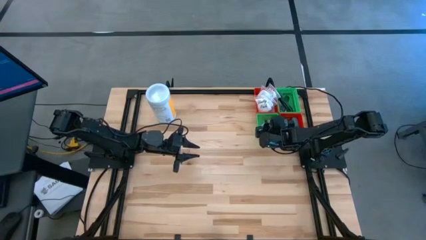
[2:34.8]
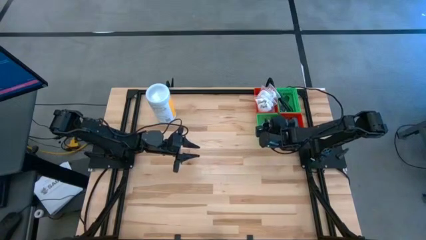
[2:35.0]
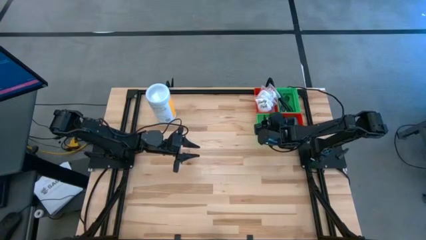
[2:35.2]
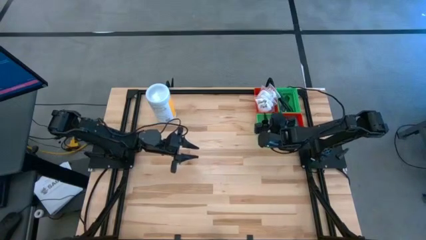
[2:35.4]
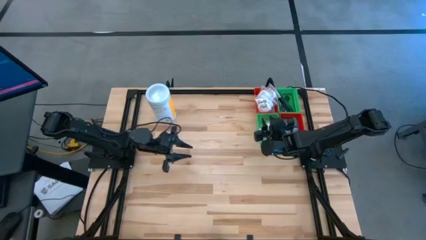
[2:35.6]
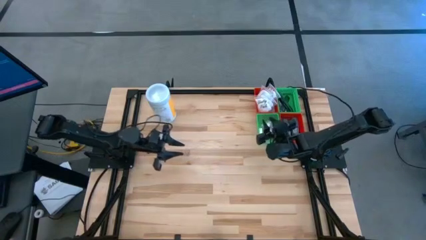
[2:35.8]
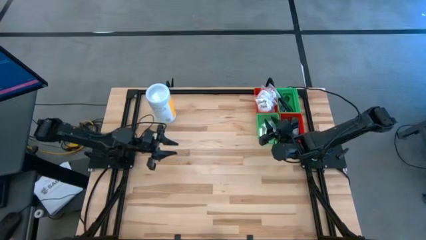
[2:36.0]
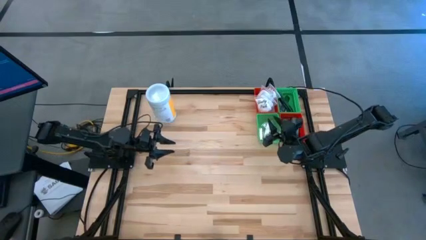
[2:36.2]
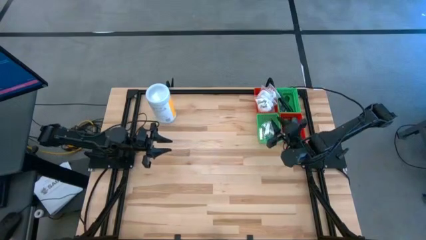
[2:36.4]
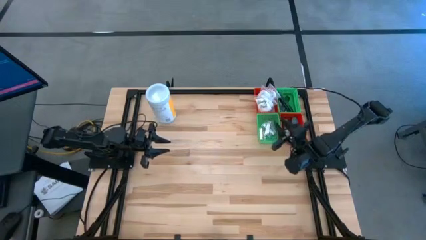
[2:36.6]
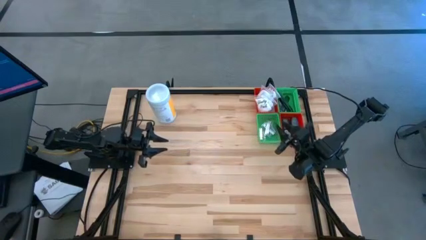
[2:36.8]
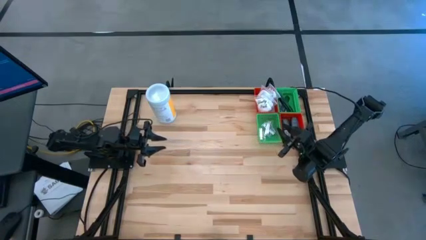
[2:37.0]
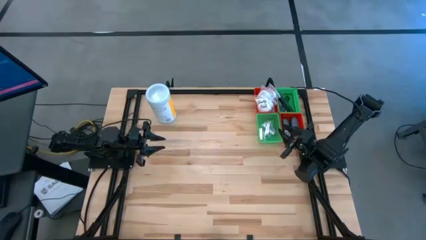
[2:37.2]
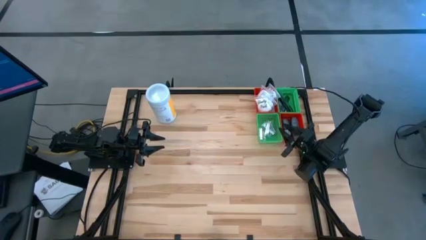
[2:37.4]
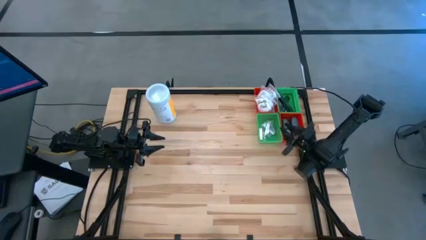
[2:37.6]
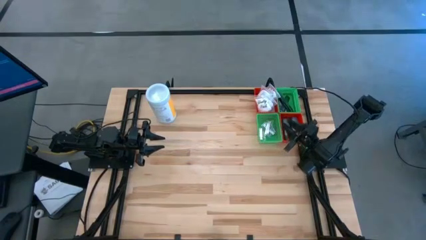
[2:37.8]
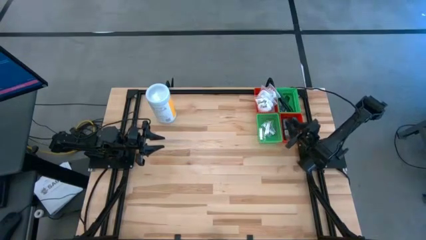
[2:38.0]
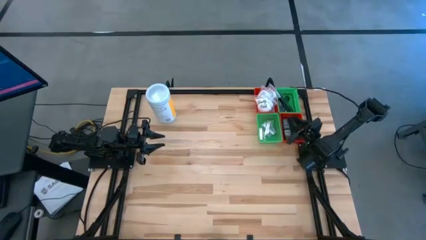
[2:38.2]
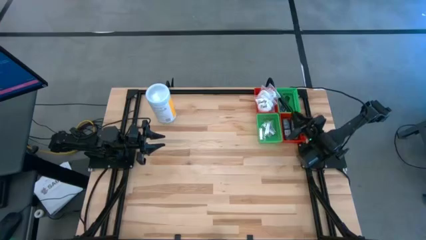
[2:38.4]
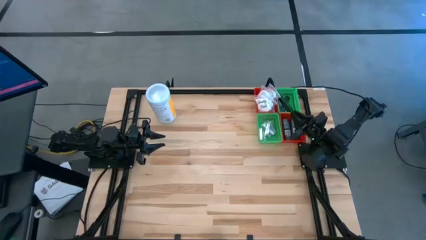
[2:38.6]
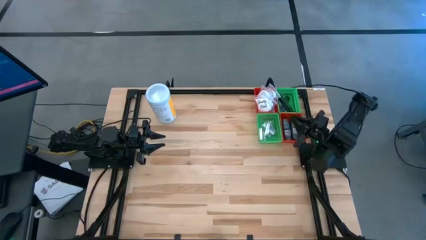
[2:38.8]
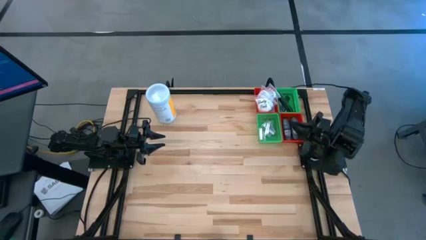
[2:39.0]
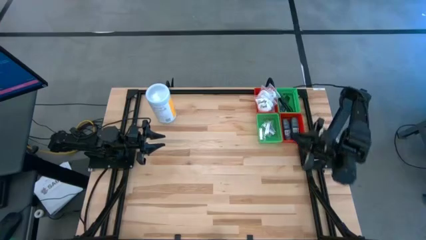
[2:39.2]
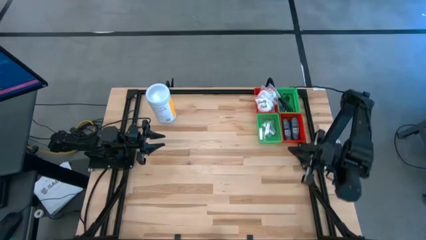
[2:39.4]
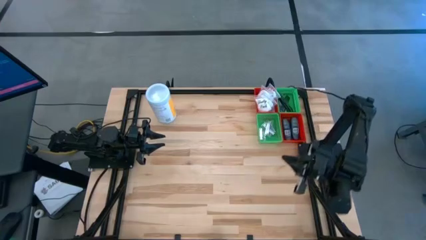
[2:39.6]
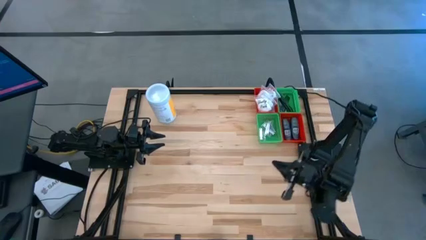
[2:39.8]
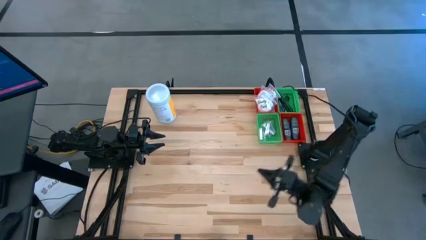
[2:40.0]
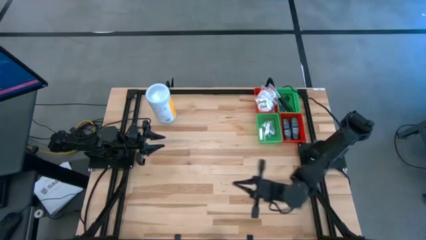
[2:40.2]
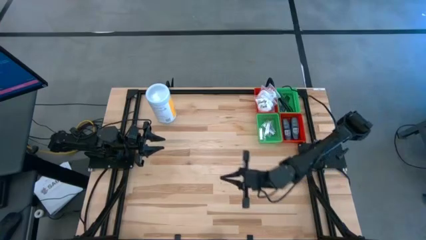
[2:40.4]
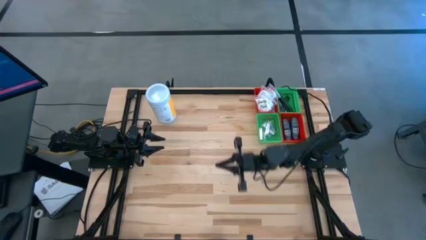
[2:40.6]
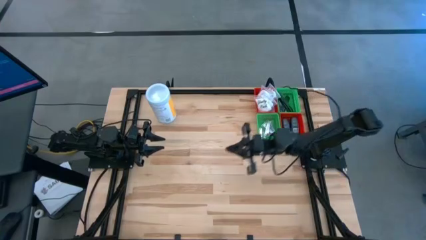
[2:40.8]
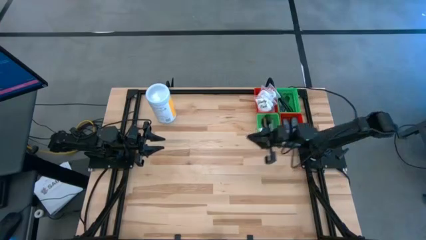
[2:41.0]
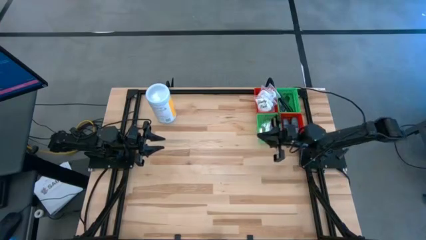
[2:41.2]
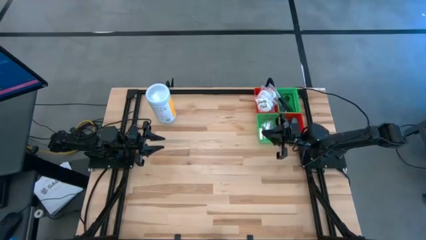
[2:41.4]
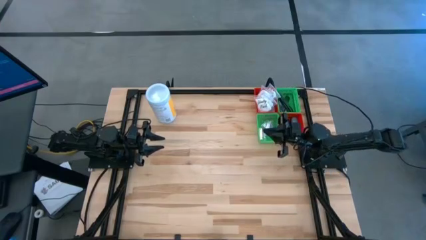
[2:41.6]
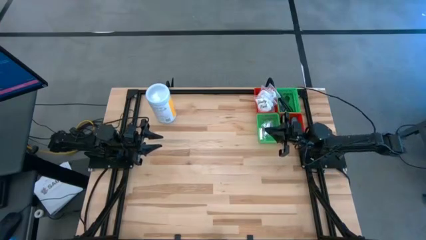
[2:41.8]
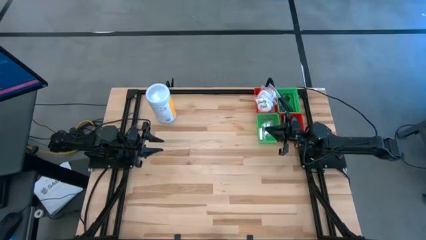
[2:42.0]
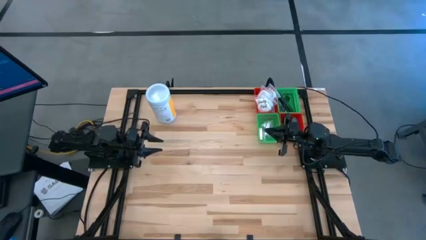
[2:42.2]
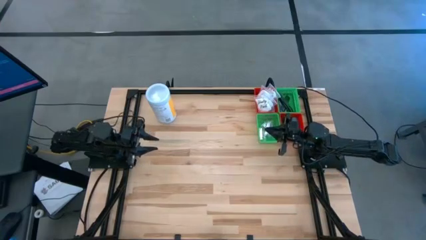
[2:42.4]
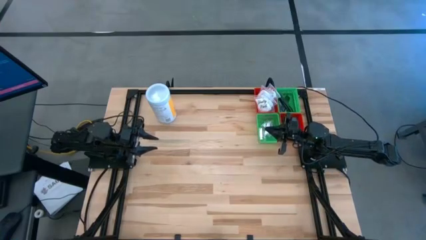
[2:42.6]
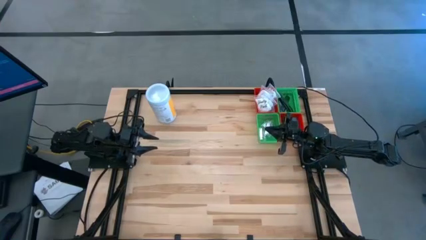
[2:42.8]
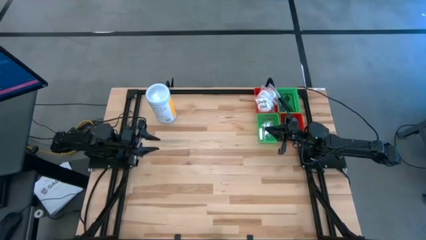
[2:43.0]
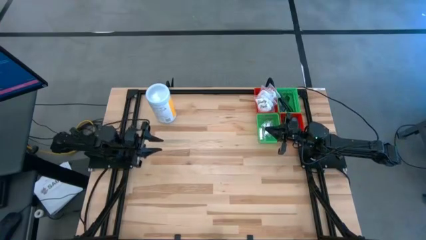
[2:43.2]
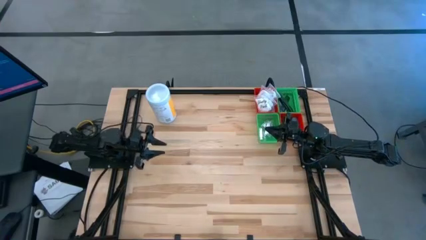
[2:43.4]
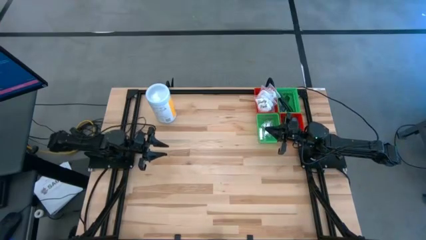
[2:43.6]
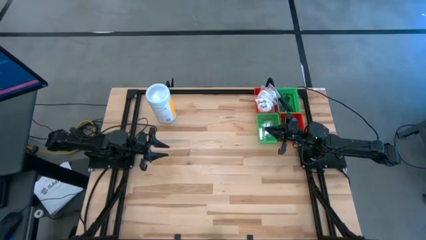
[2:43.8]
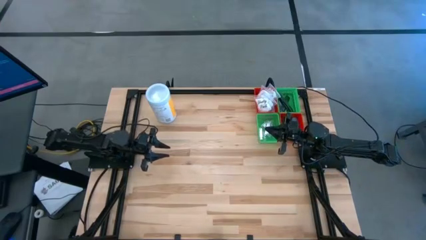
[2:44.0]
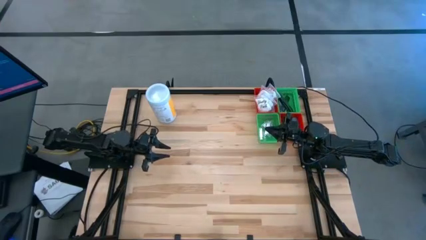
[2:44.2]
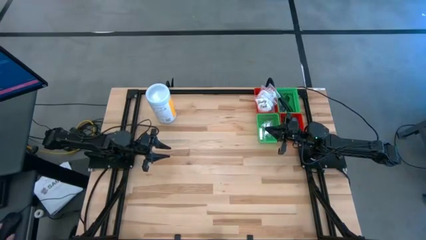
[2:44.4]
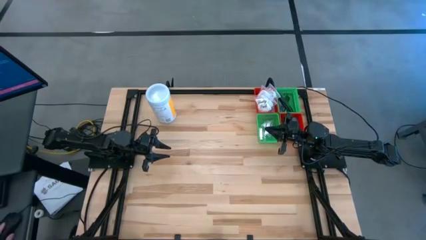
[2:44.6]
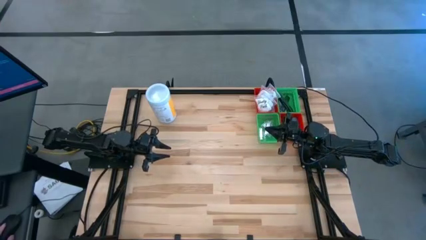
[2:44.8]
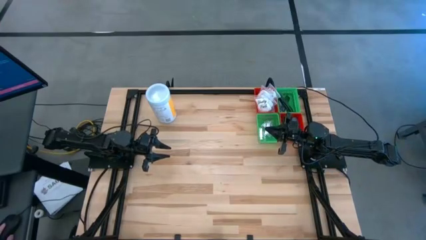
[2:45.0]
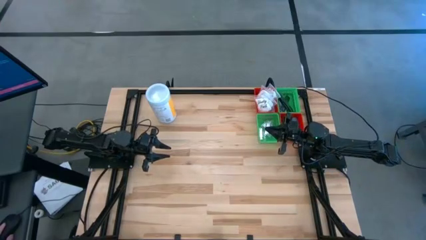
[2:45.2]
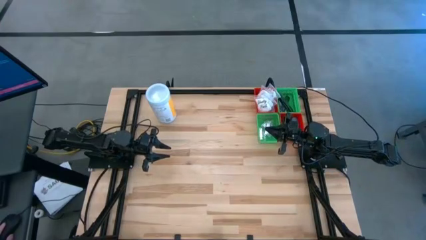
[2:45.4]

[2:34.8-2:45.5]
Task: Pick & Place Travel size toiletries
Return to Home Position

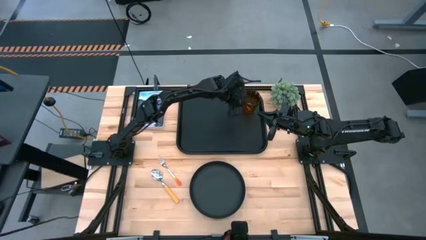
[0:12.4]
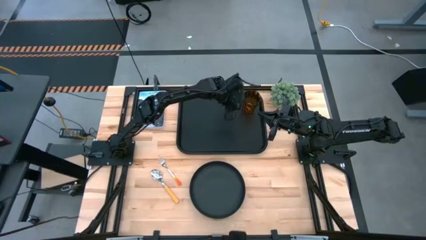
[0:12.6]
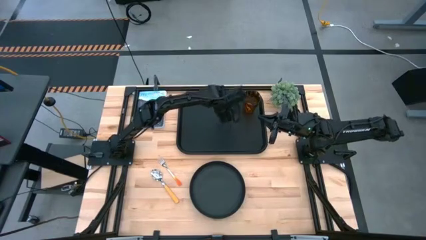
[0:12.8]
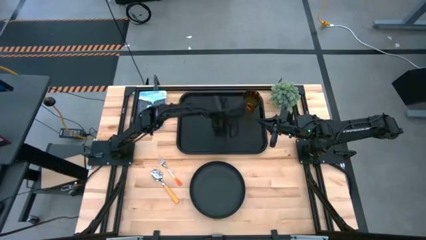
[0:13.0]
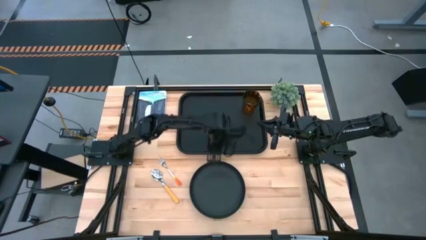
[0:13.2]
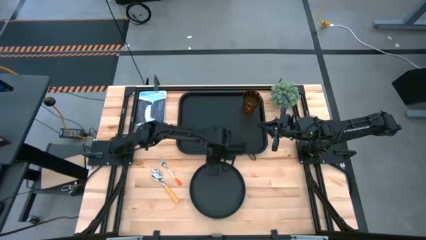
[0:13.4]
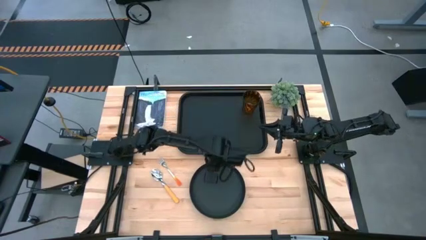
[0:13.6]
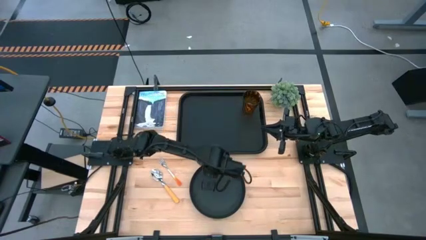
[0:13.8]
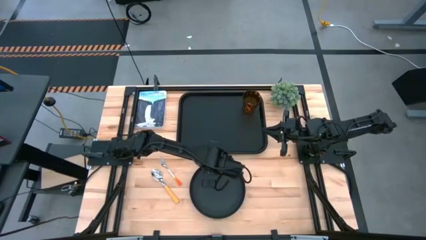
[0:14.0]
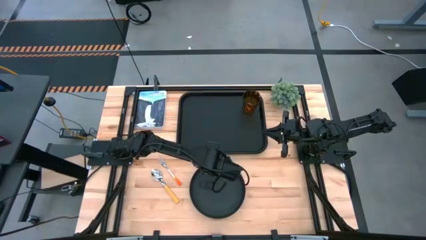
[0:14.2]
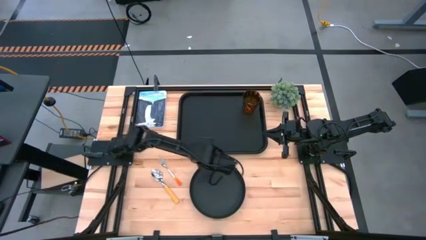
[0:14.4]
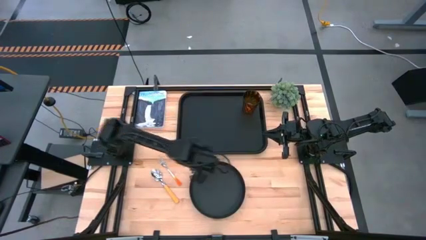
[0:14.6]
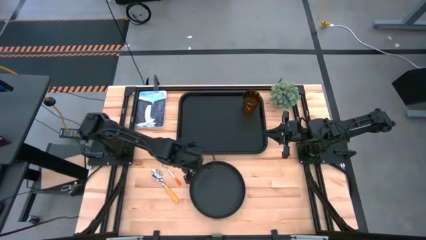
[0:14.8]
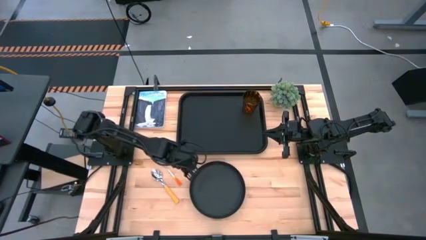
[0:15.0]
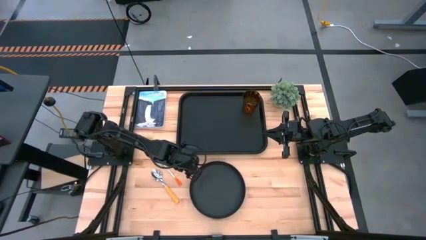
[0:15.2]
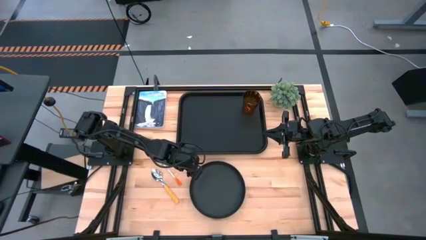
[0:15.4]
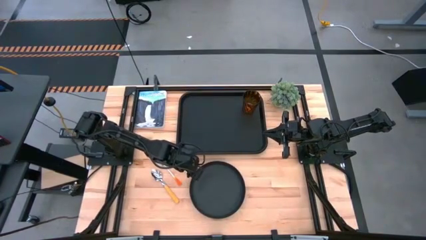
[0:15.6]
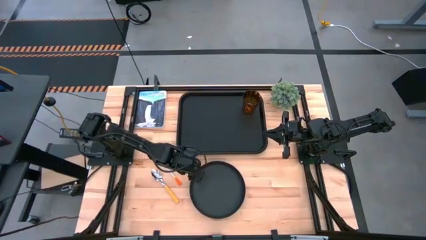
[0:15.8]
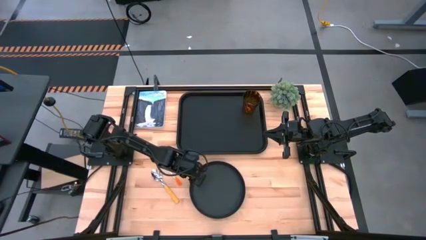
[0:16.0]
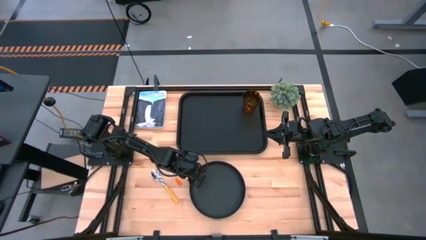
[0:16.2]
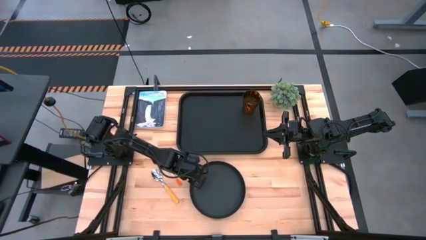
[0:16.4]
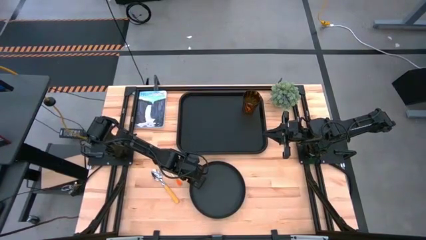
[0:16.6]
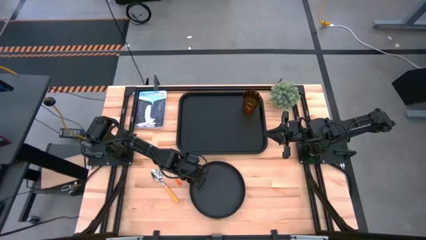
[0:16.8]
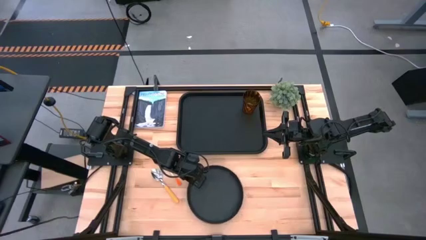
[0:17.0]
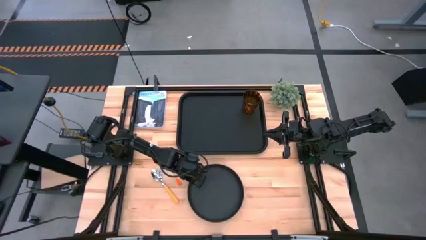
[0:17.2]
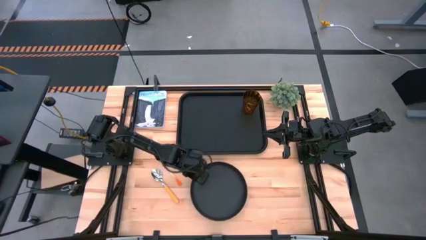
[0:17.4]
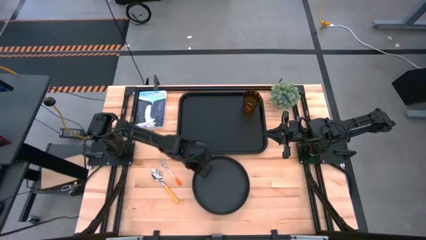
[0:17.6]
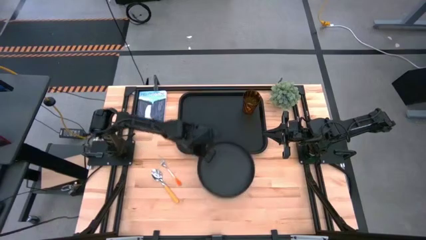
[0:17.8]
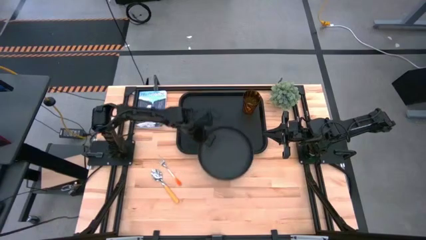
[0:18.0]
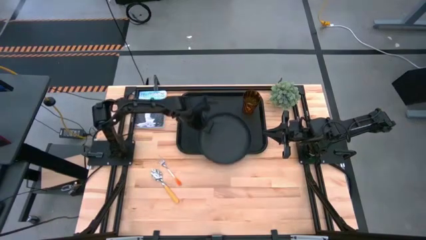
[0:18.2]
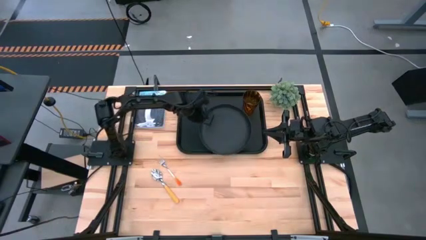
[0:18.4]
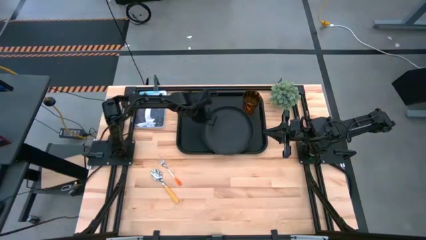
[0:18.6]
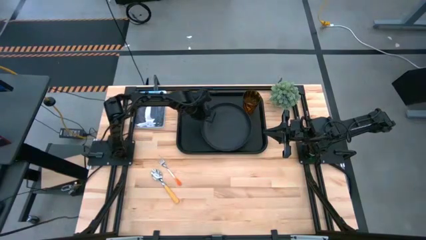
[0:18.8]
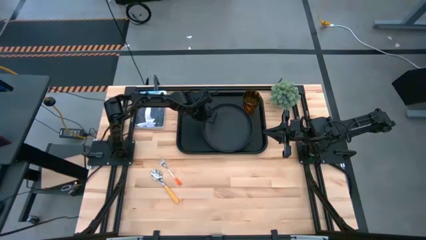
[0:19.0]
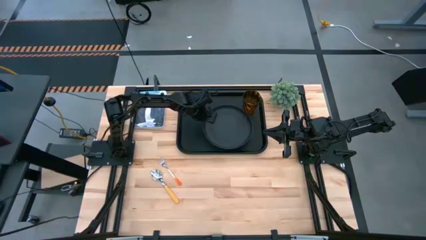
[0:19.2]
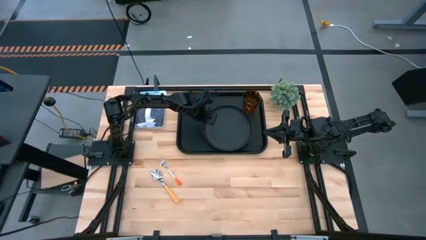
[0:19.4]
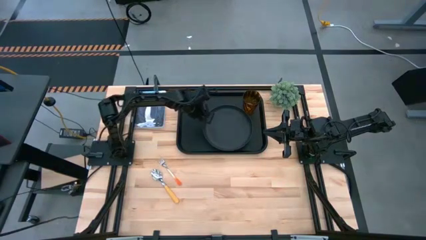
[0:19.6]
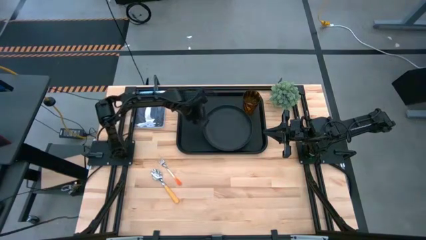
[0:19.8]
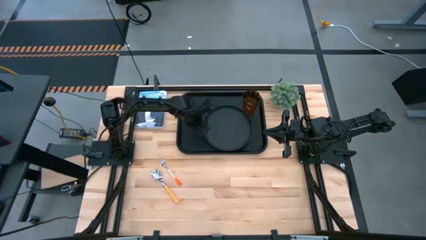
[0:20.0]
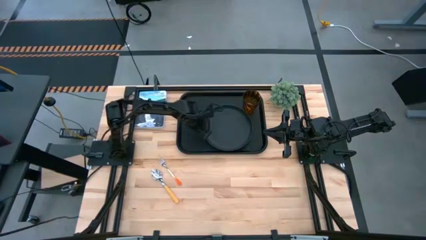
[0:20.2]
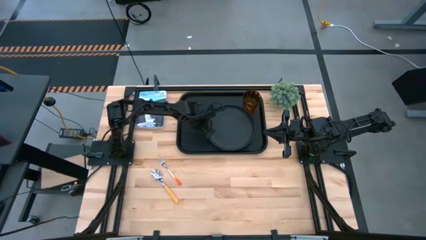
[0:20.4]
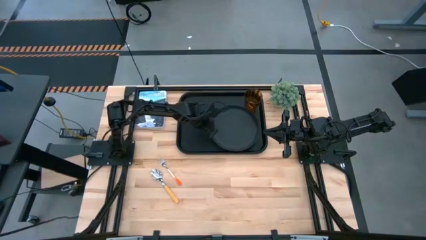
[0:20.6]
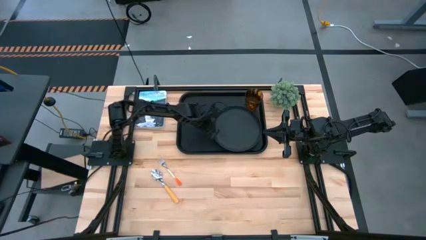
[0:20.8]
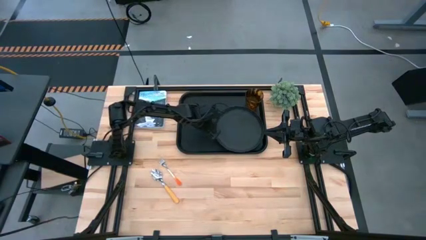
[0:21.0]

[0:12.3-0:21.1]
Task: Pick and place plate/cup/fork/spoon on tray
Put the black plate on the black serving tray to bottom of the brown cup
